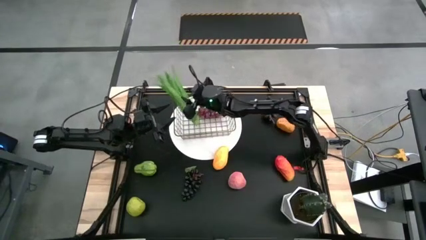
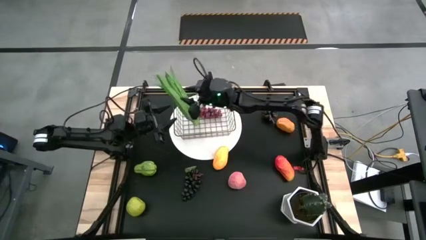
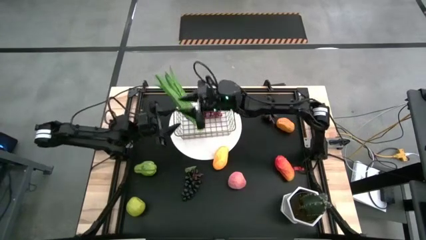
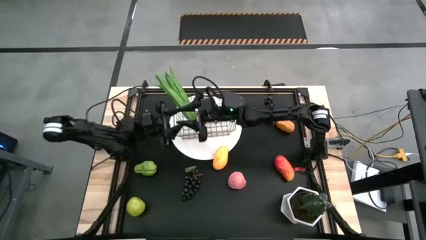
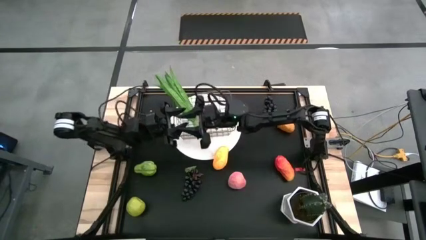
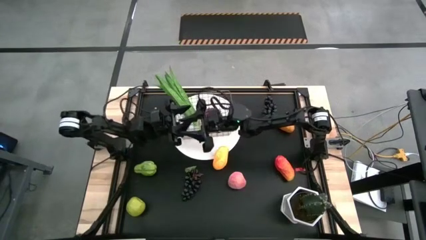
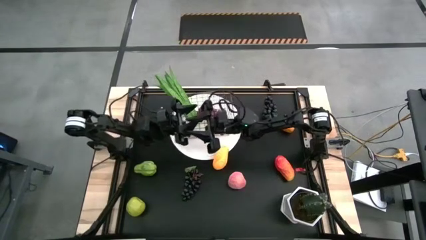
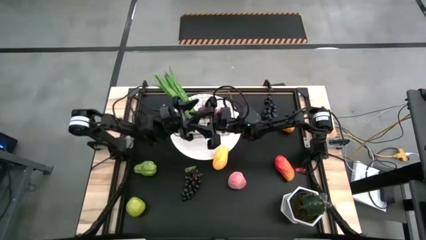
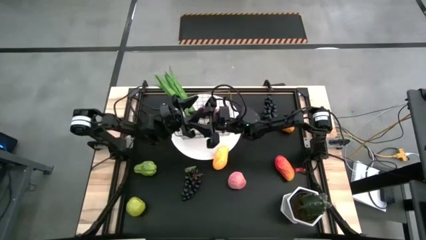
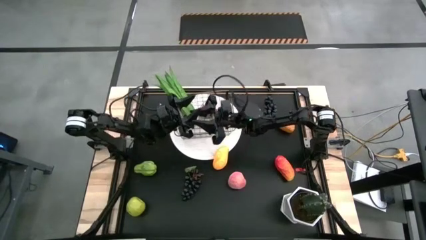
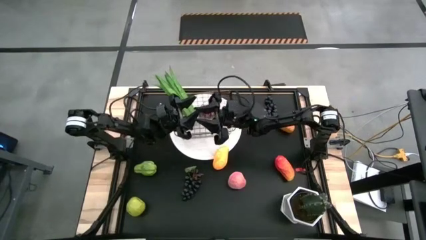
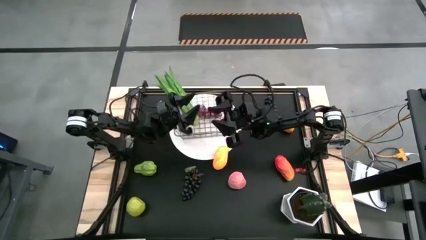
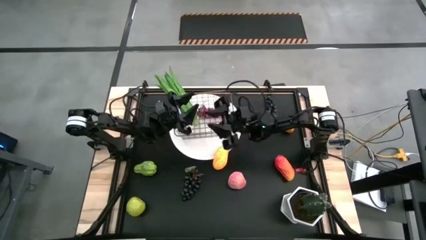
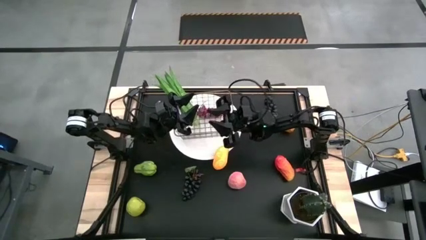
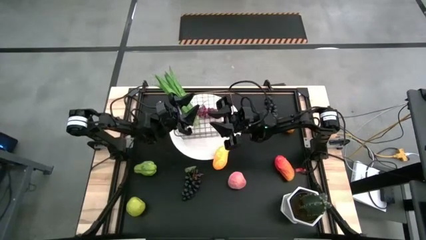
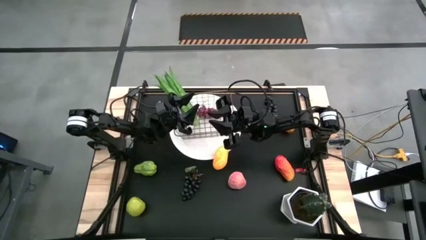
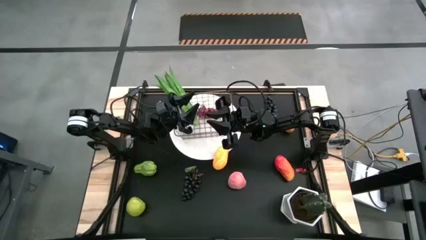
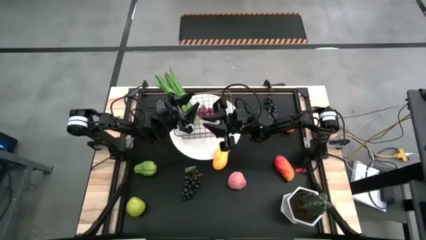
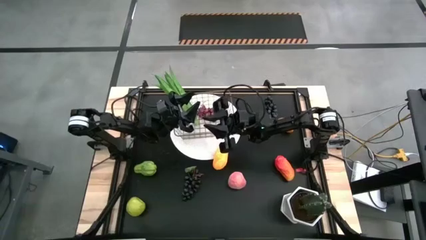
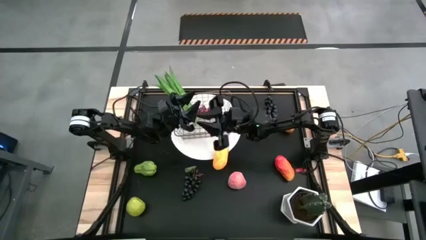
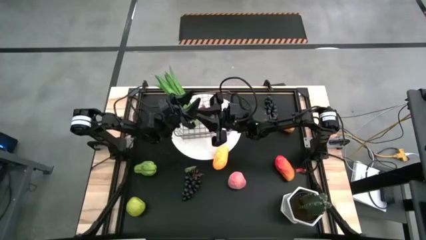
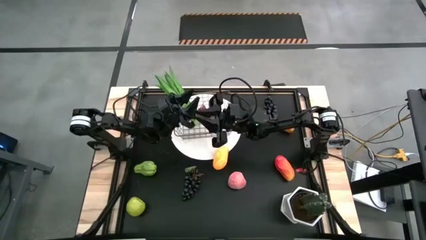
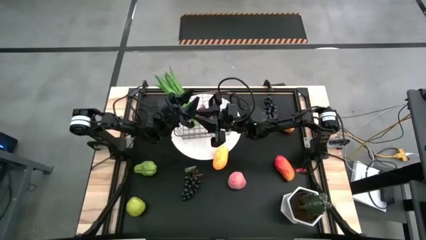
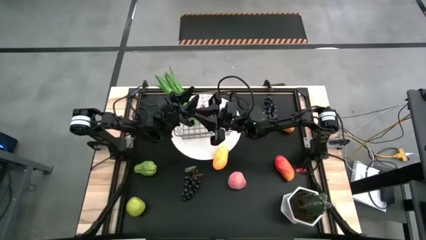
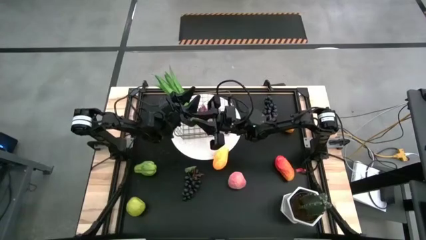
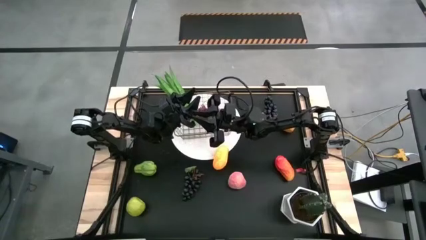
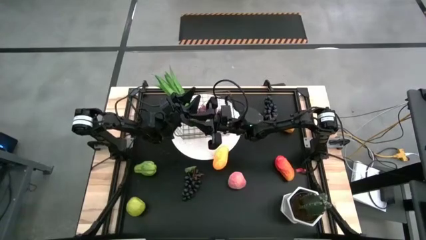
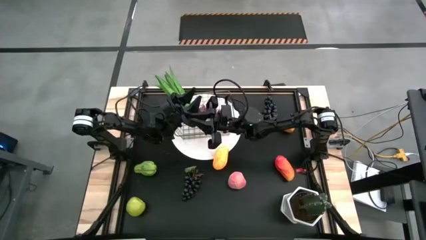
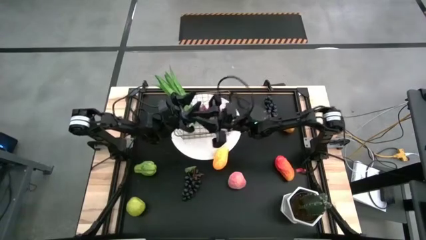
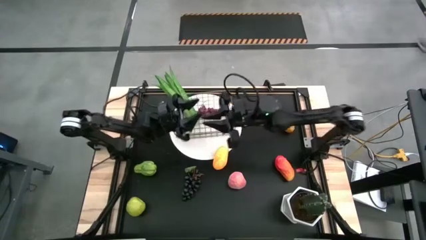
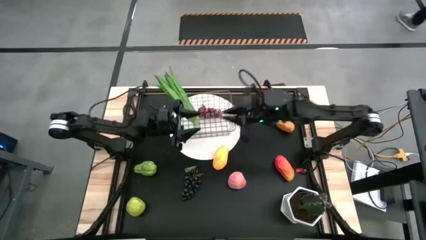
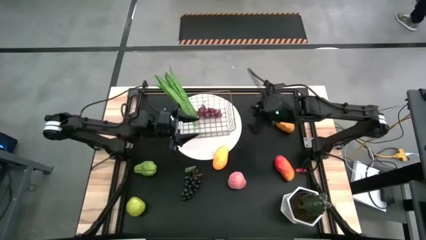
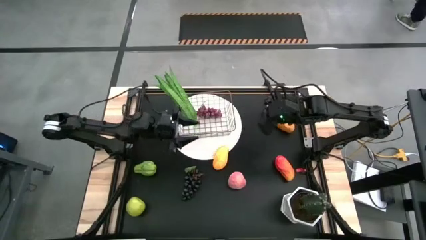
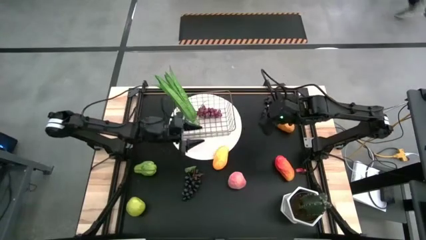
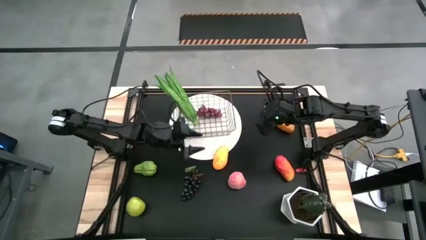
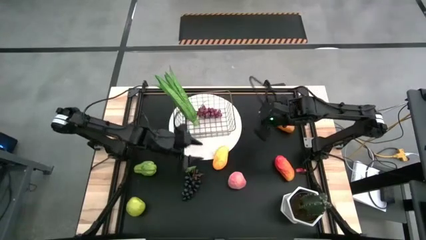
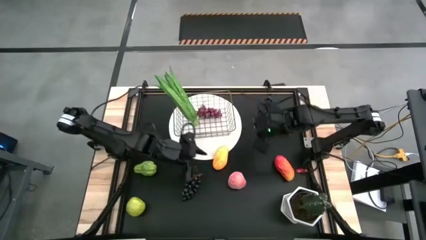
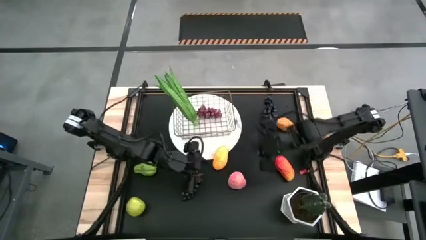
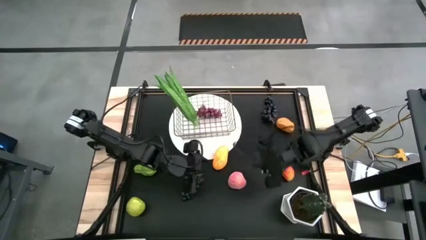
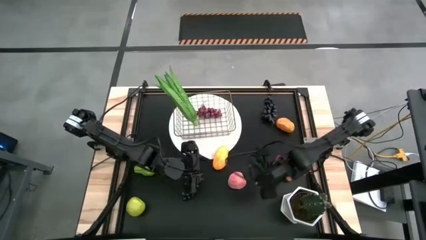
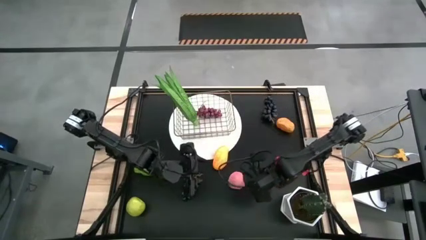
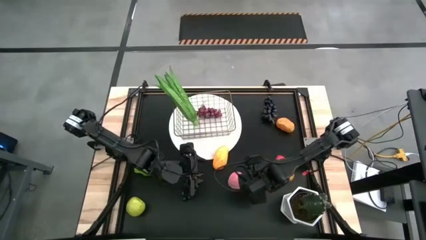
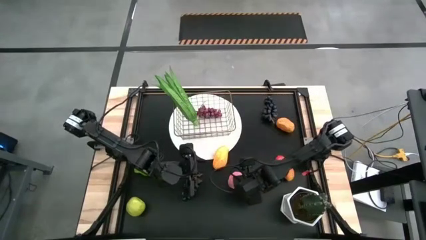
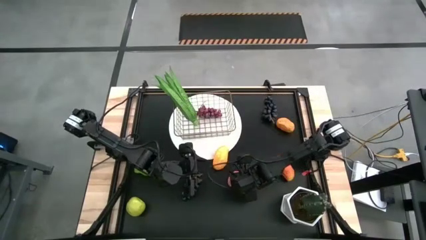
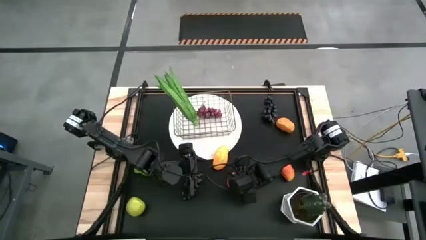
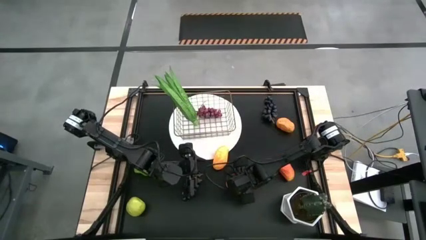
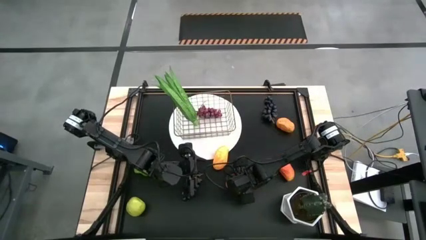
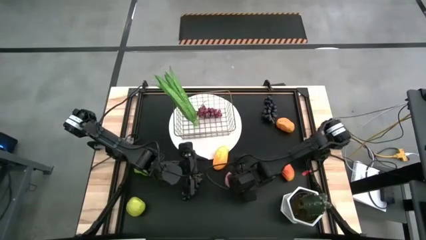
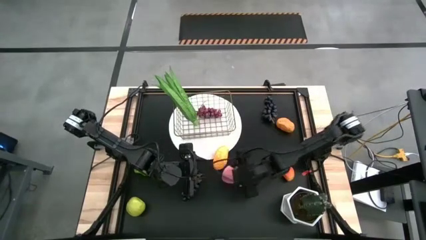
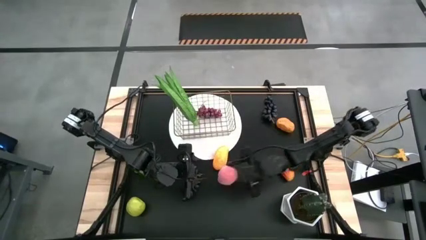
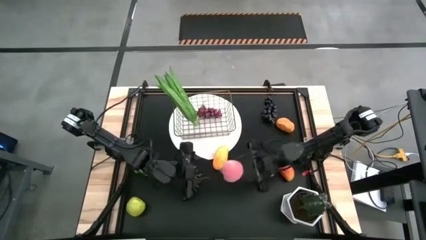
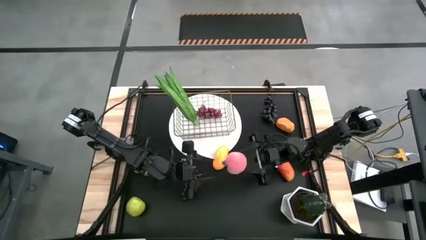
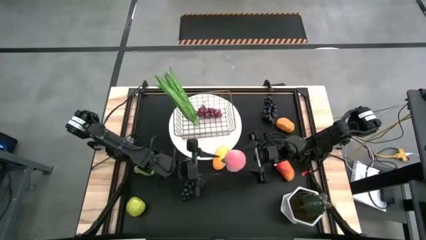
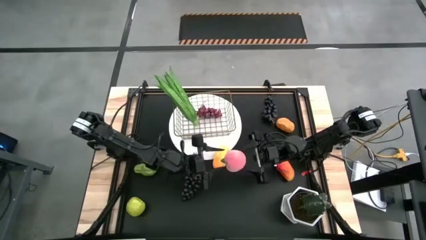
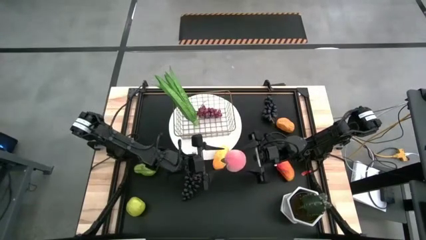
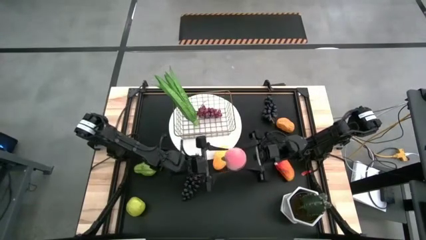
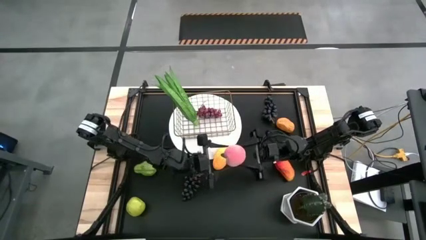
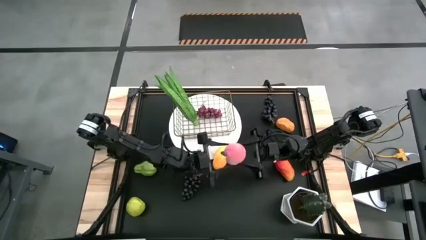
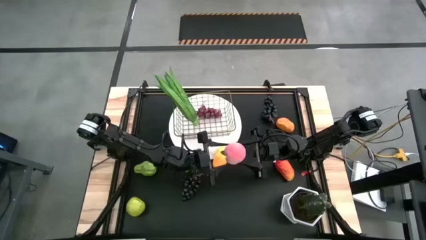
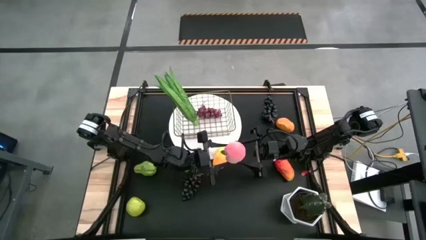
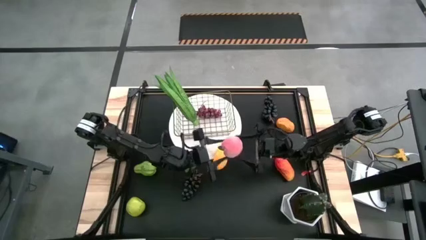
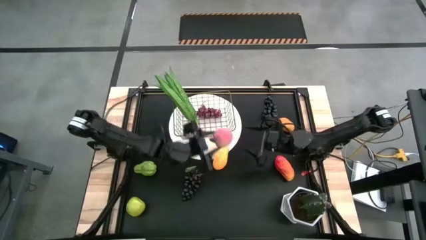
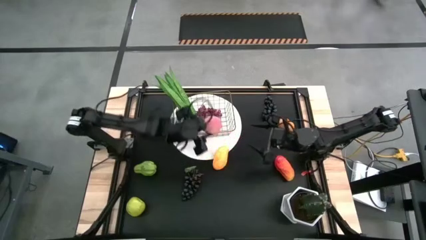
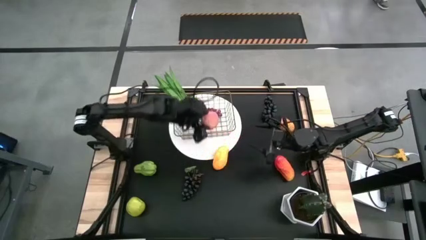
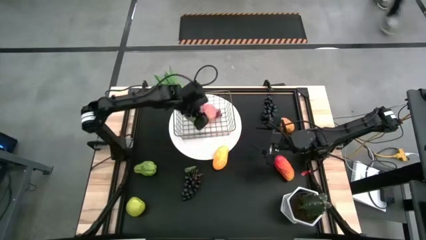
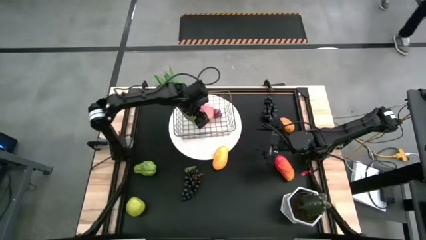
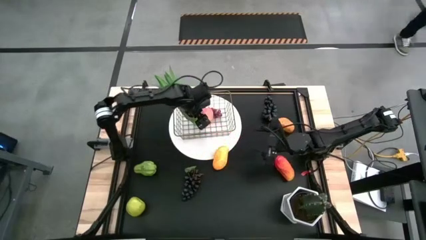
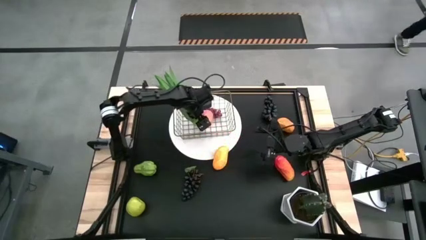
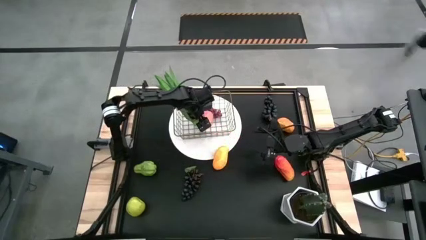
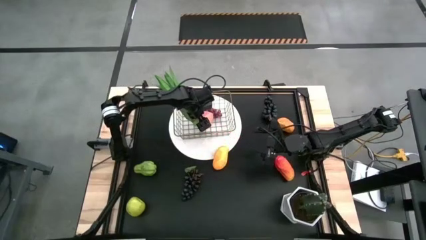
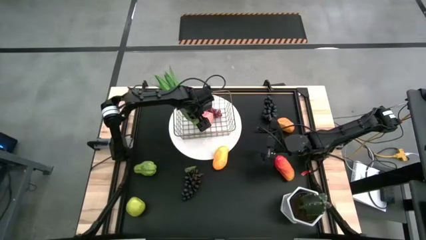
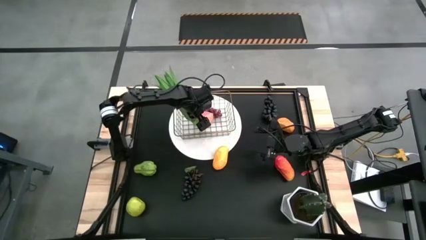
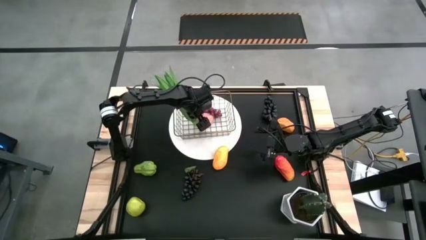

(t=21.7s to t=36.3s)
Task: Build produce basket
Put the pink peach into the gold wire basket
